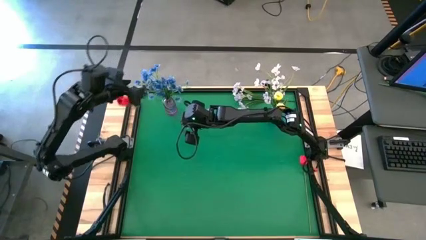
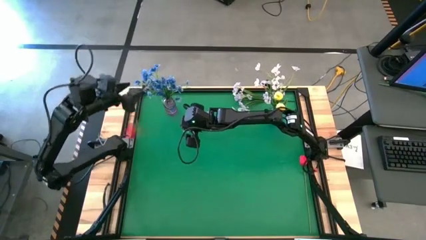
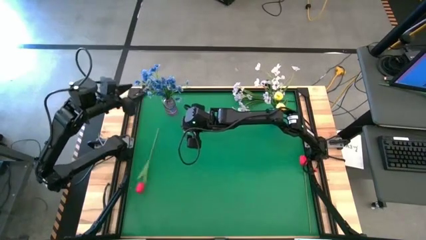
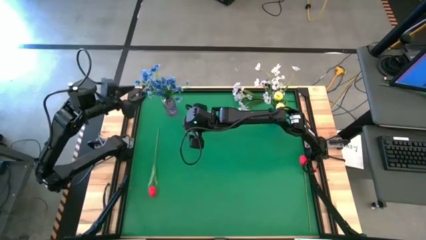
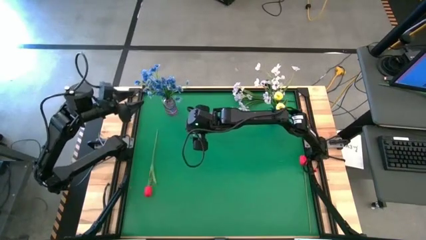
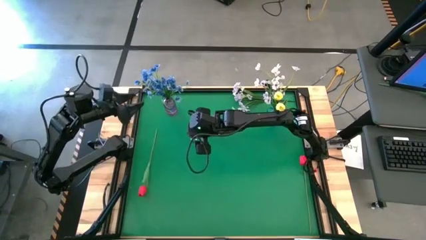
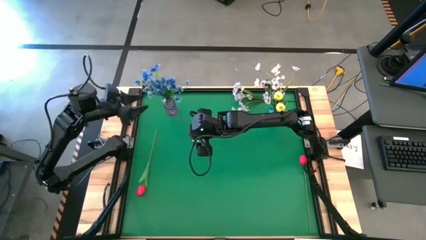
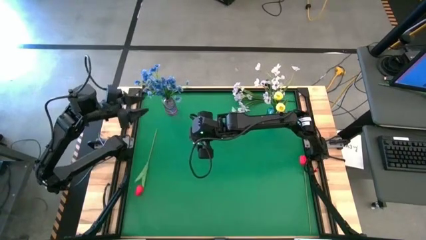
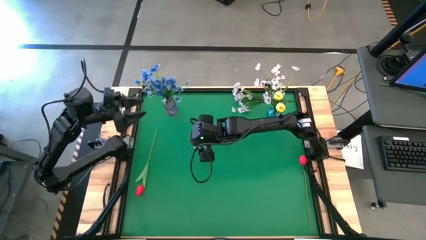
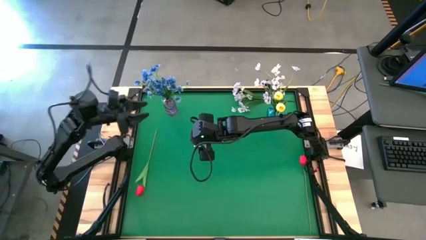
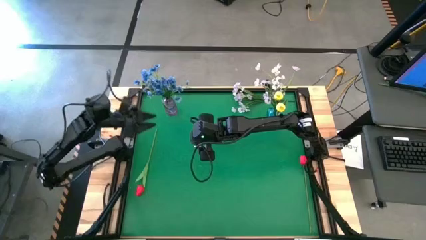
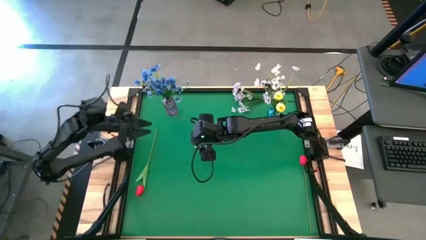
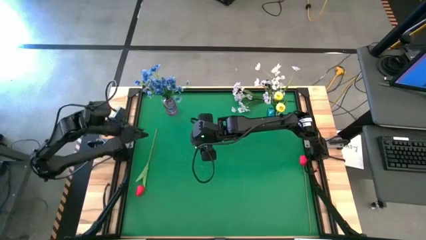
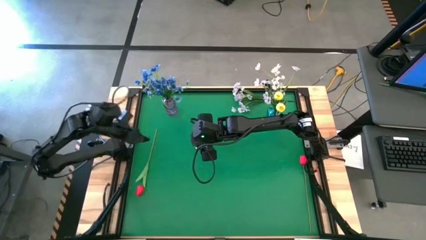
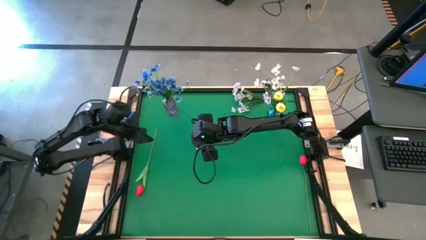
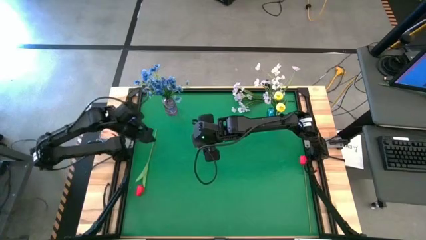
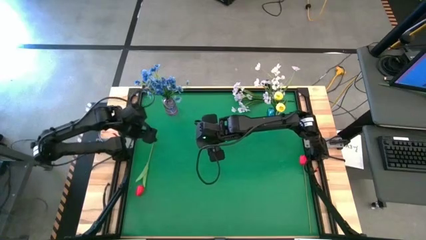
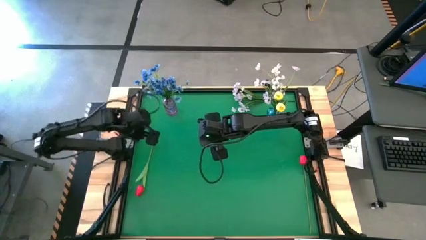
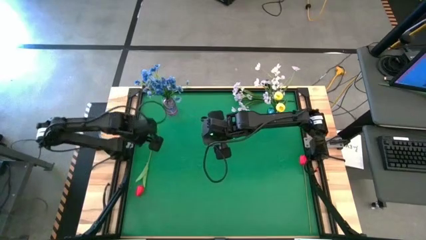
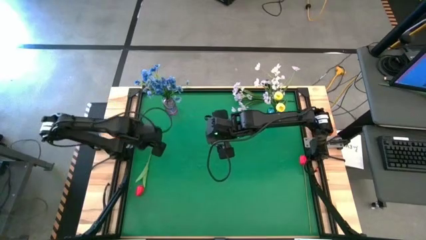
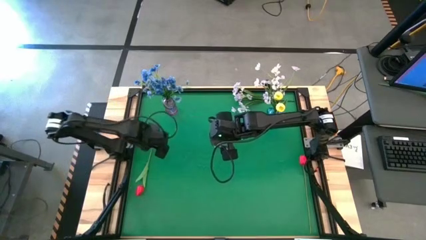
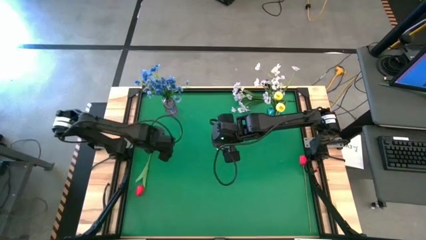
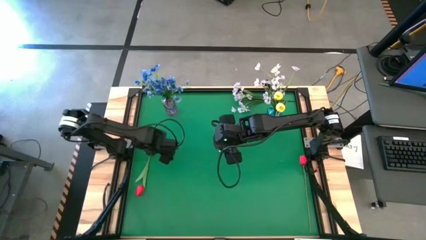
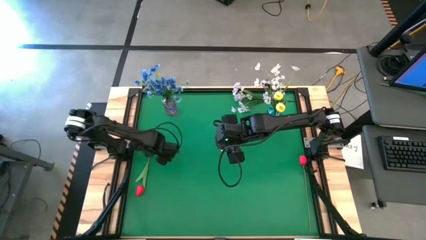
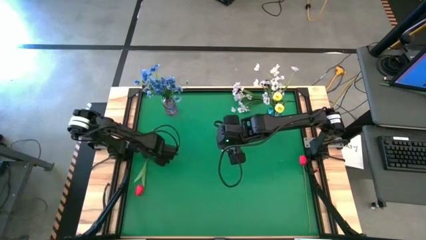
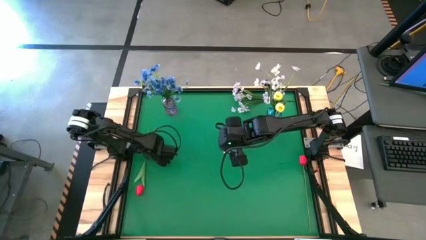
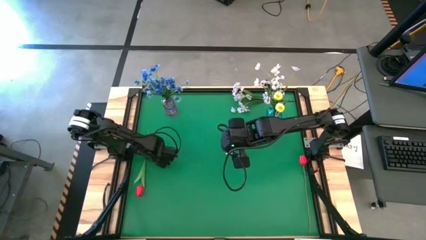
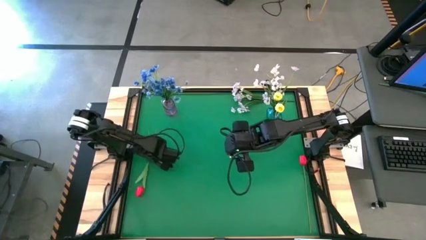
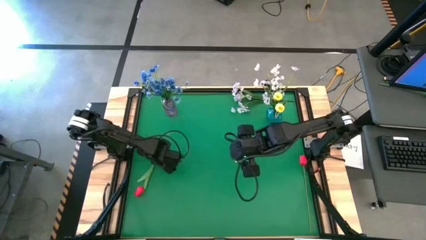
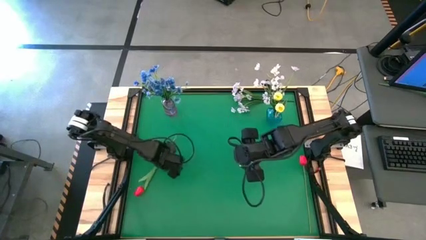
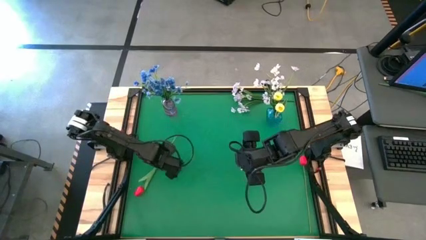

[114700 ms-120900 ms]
Task: Sort flowers into vase by color
Put the left red tulip into the purple vase

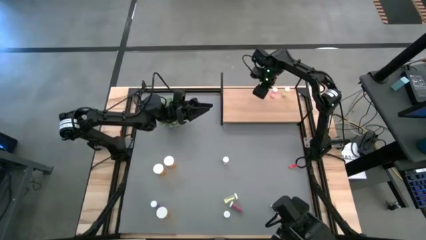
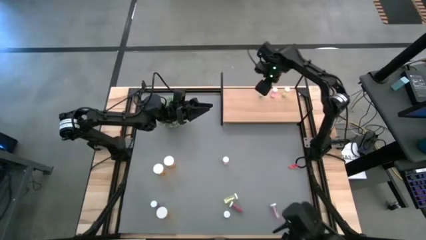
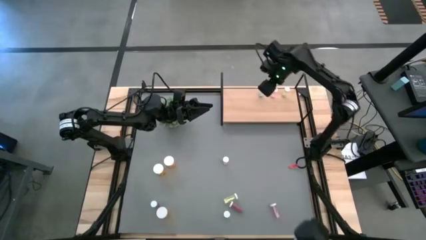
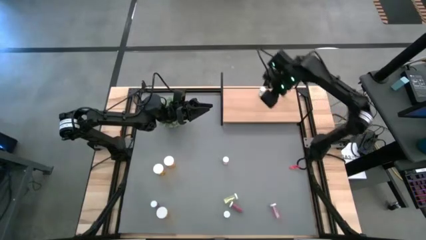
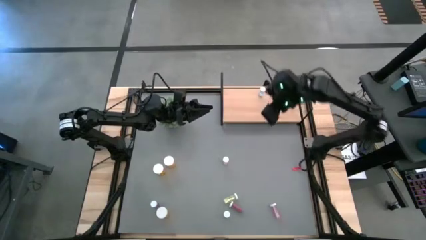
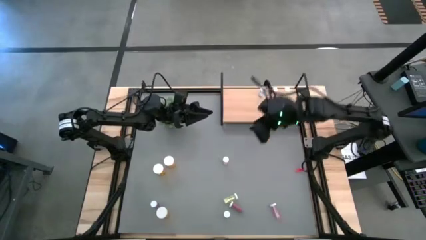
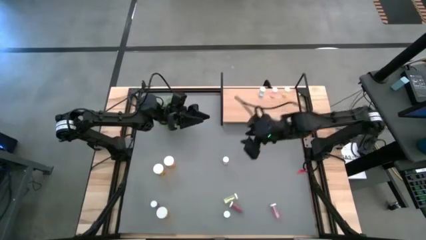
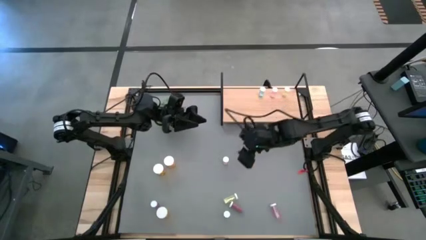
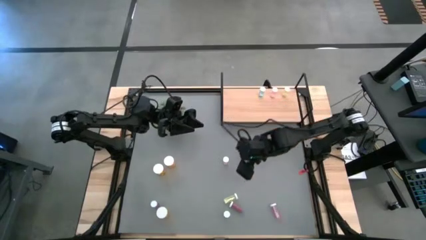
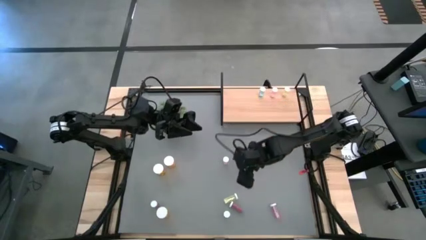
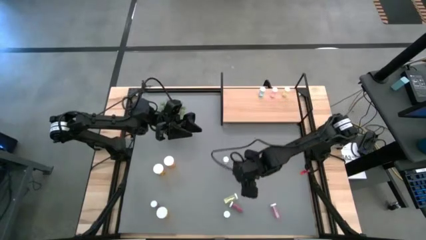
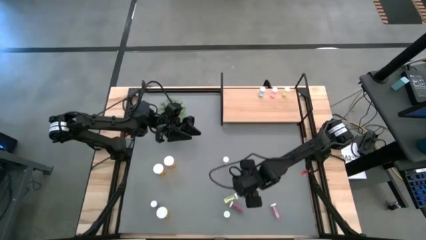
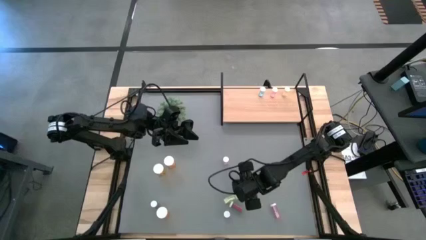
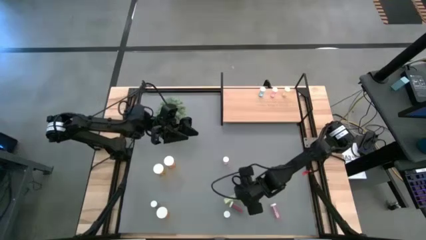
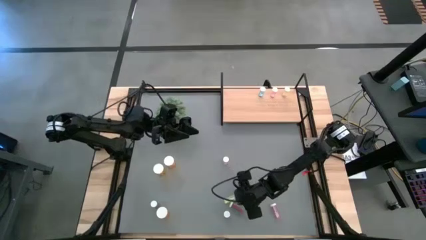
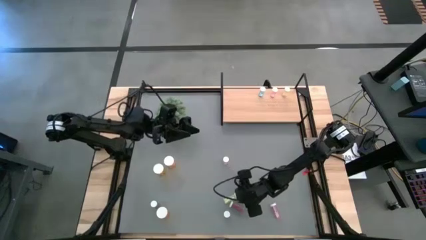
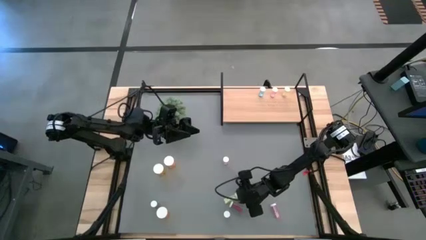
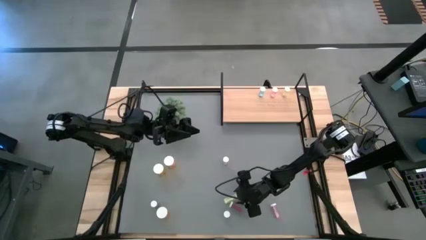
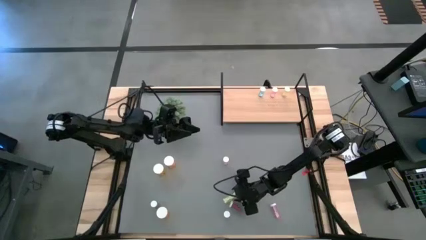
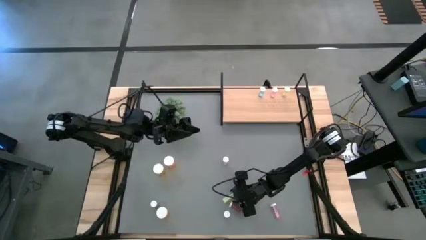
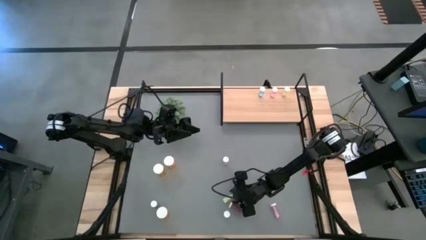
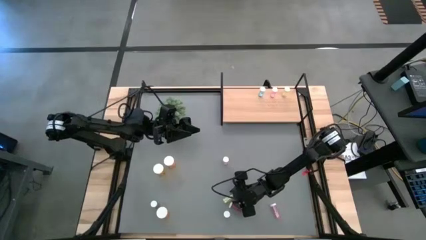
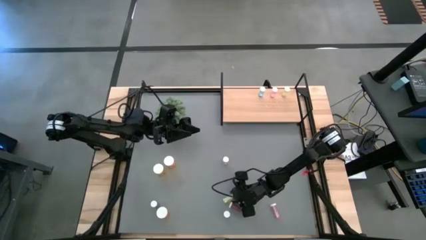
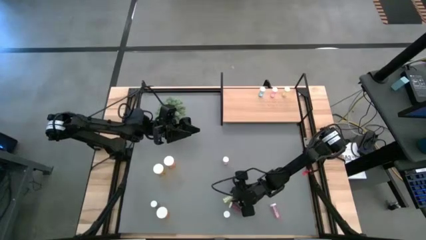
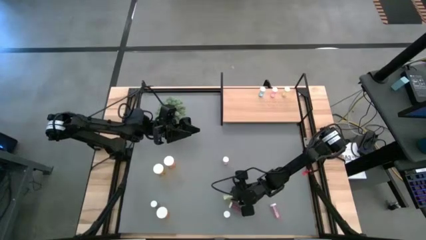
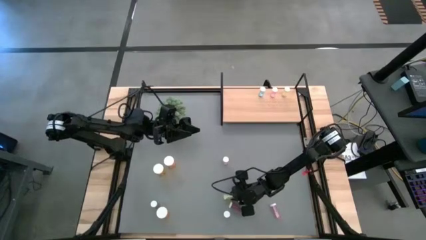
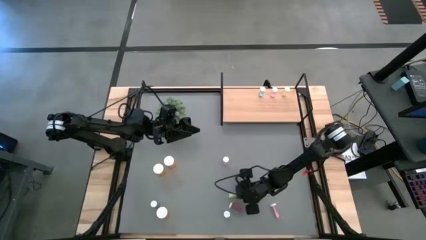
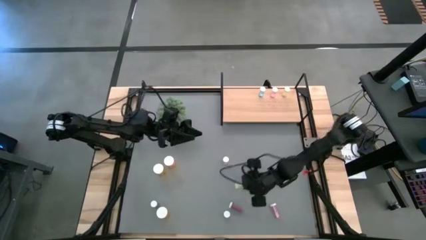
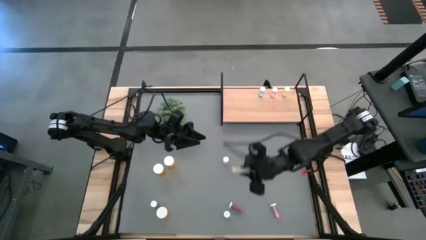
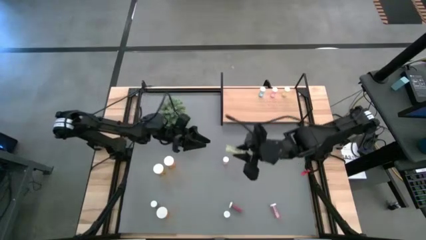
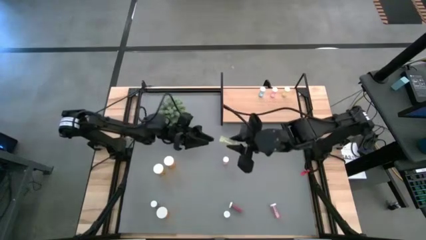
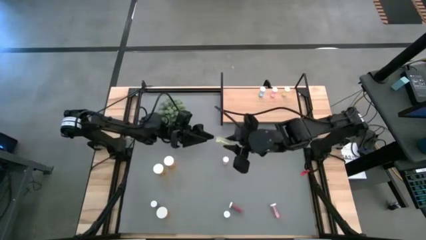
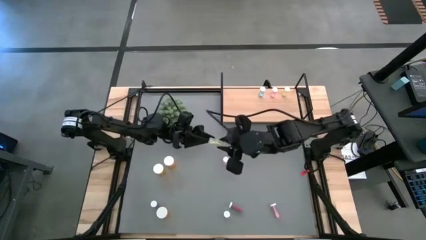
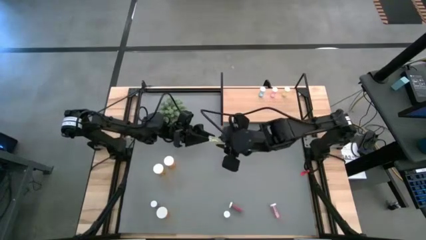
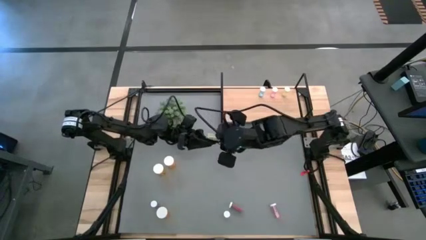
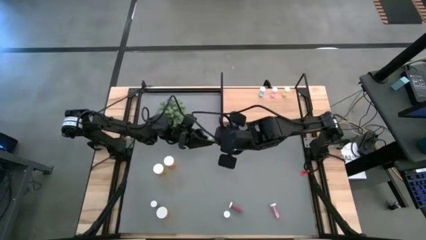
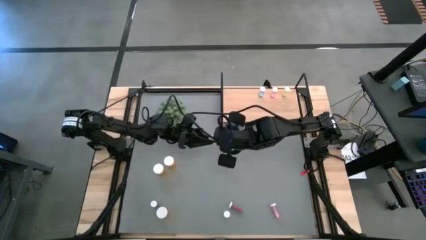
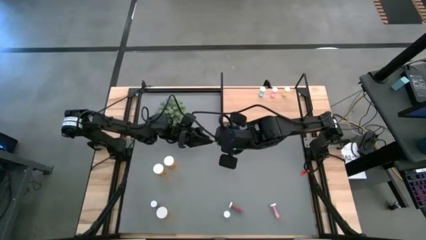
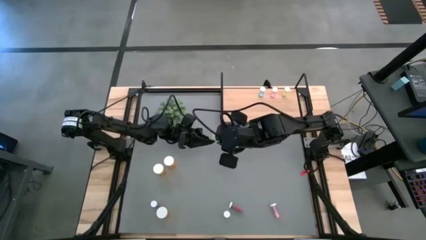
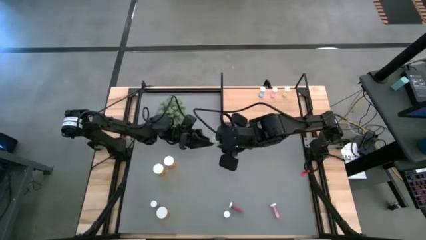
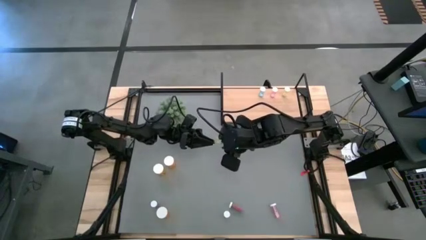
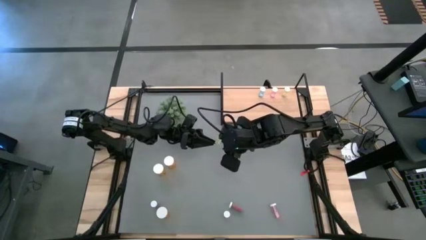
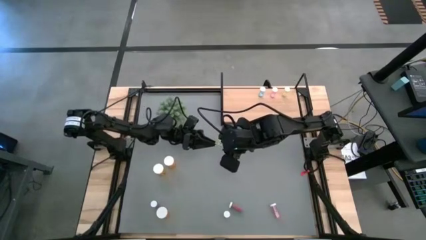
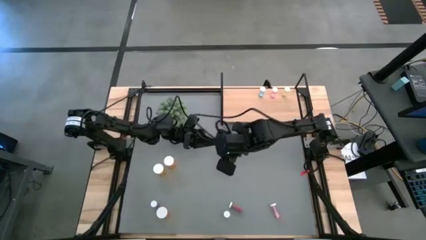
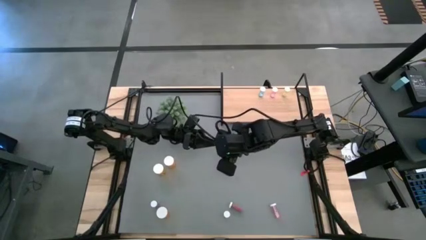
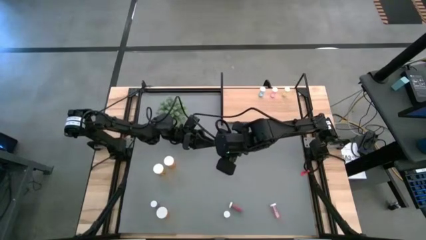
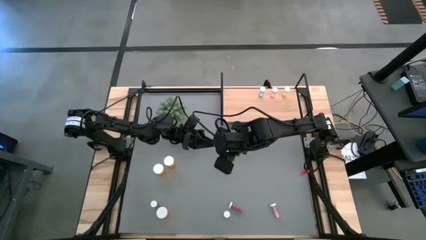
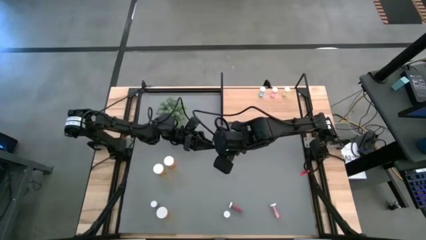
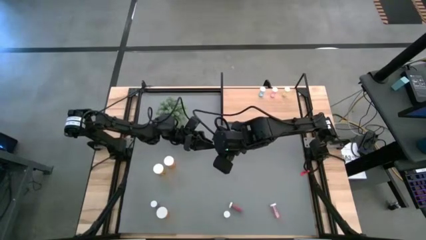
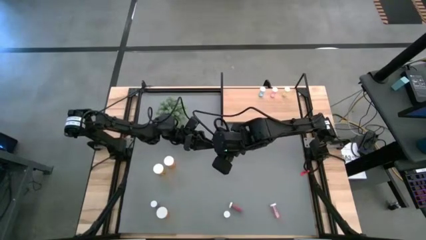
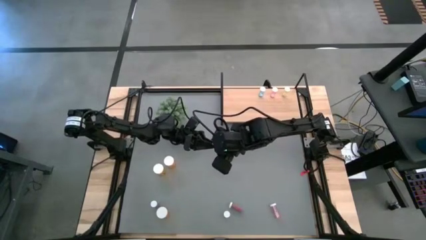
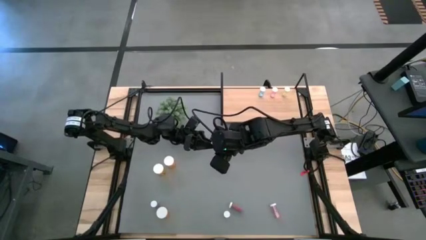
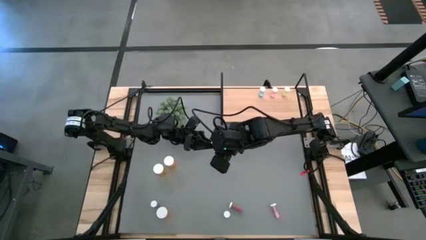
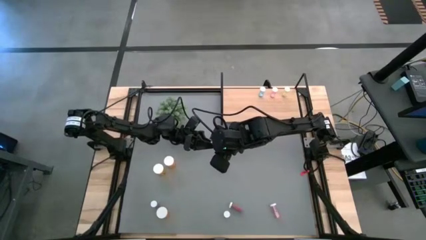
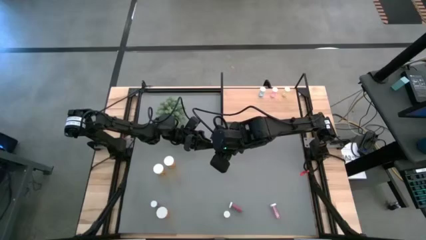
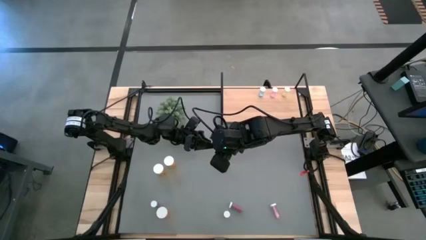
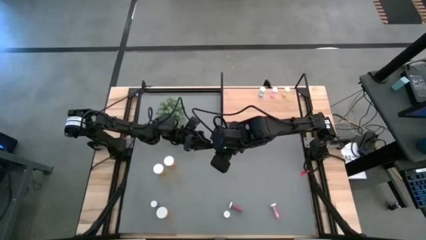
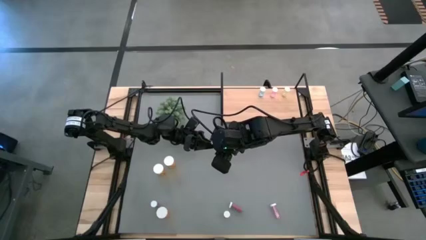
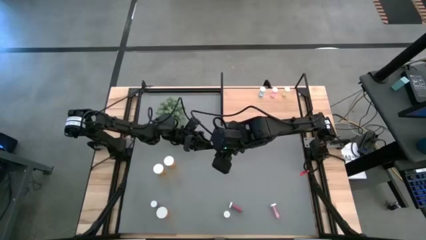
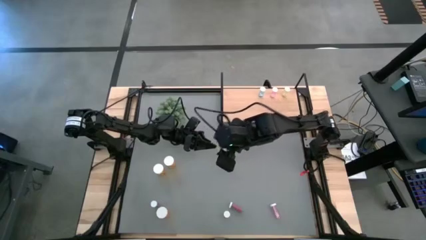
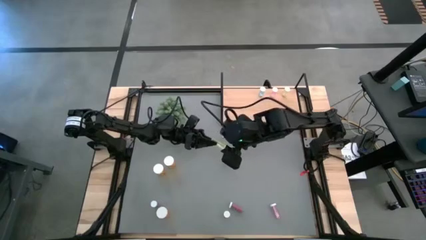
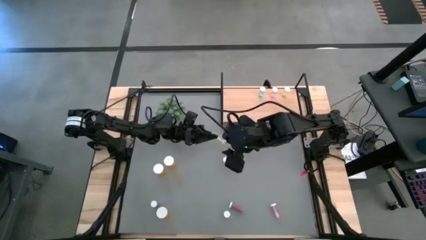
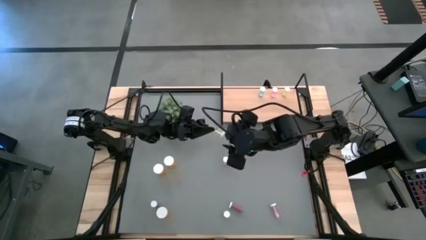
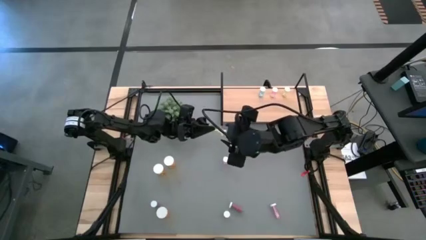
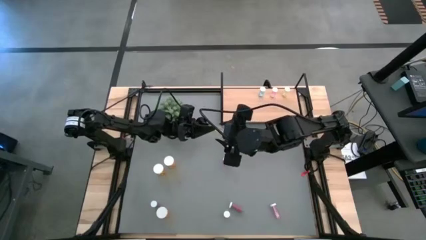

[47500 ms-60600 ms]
Task: Pick and place medicine bottles onto shelf by color
Put the top yellow pill bottle on the shelf aligned with the other yellow pill bottle
